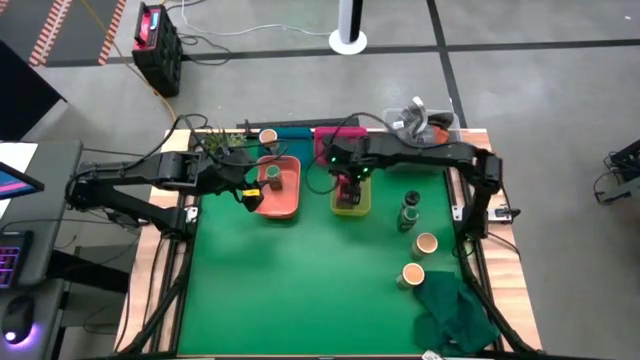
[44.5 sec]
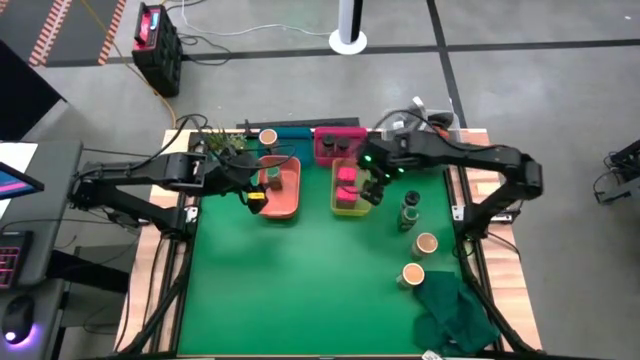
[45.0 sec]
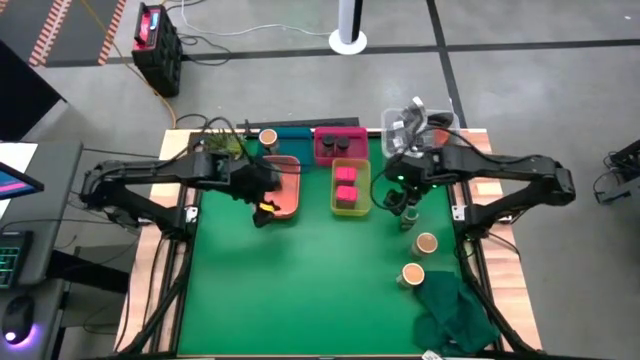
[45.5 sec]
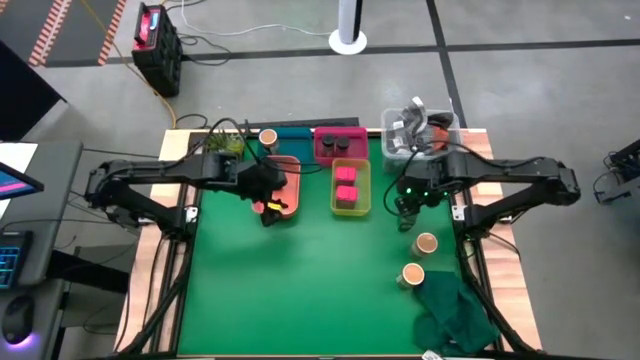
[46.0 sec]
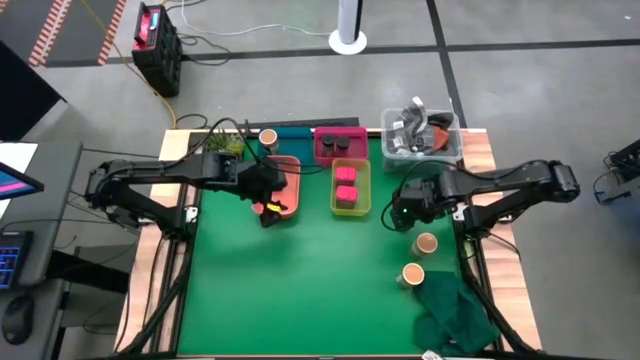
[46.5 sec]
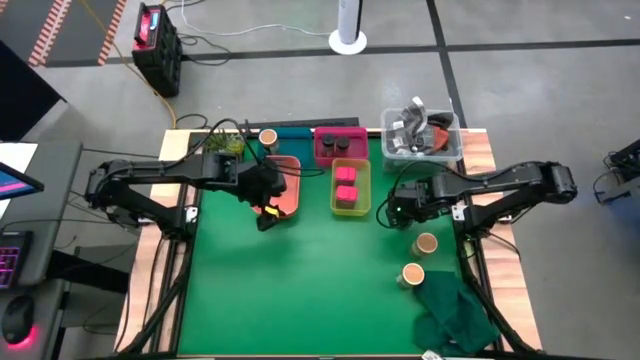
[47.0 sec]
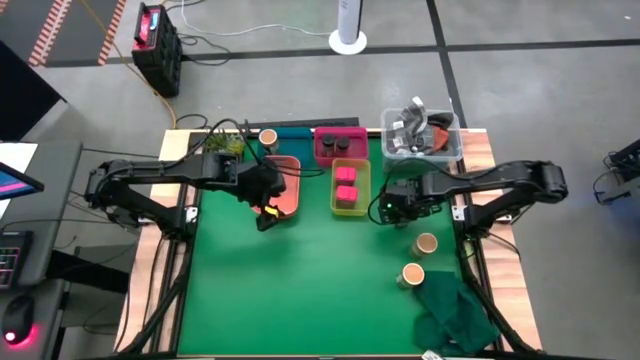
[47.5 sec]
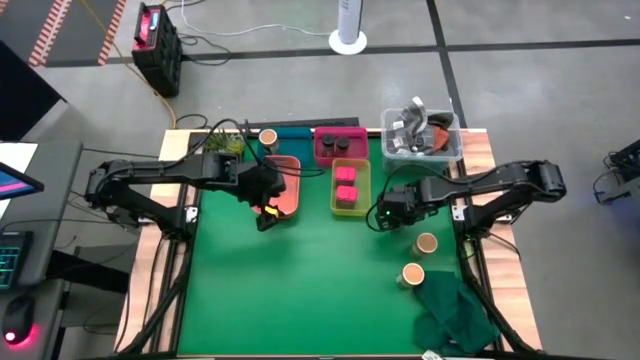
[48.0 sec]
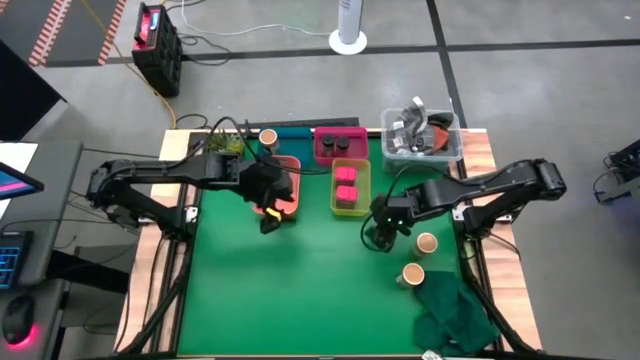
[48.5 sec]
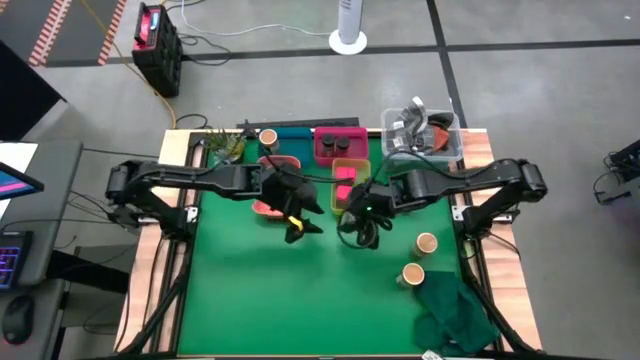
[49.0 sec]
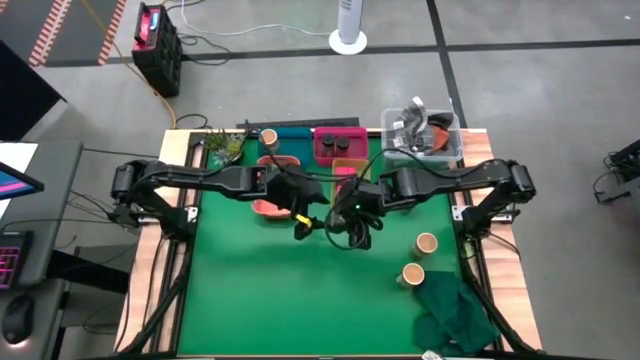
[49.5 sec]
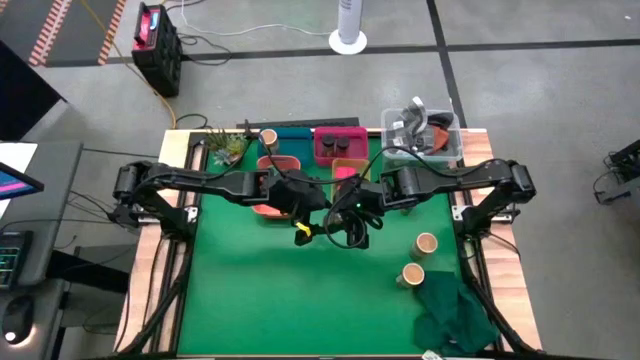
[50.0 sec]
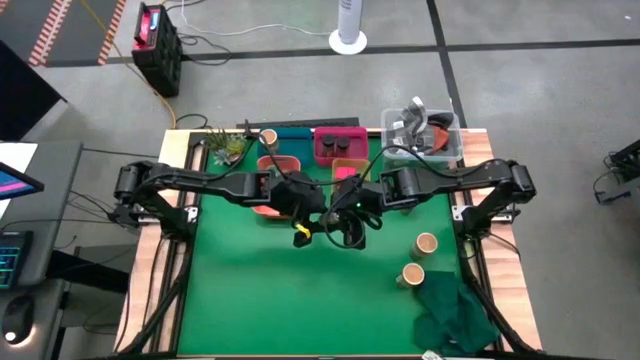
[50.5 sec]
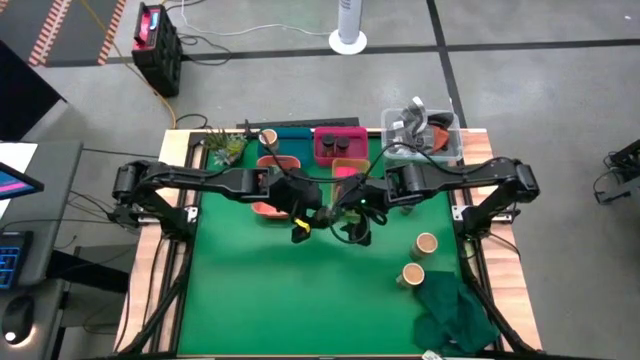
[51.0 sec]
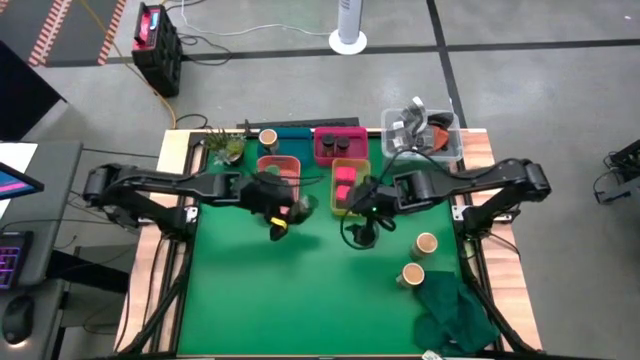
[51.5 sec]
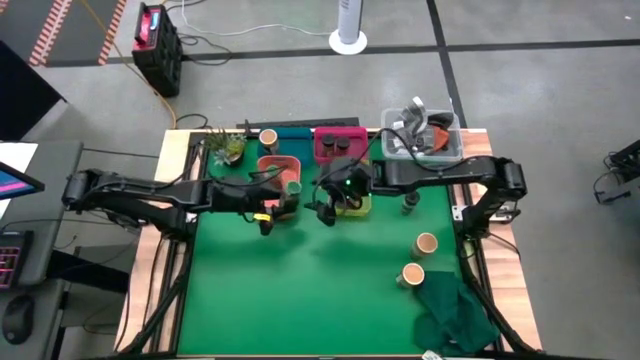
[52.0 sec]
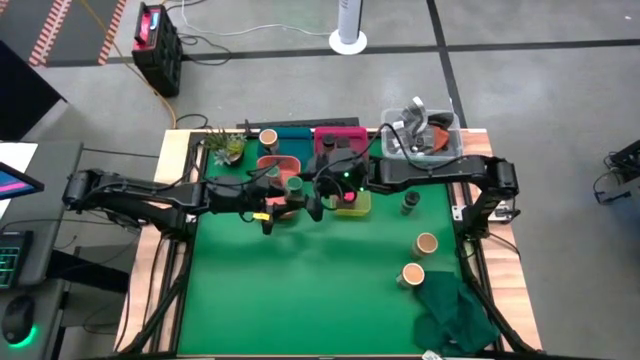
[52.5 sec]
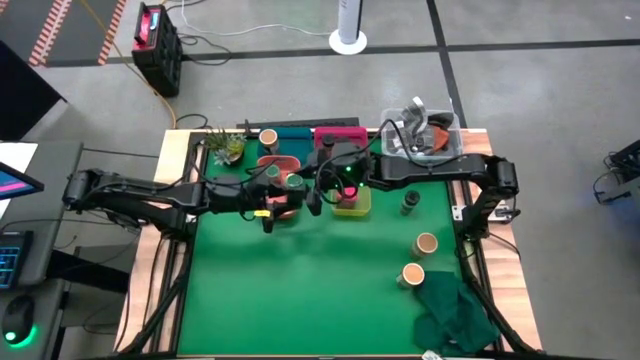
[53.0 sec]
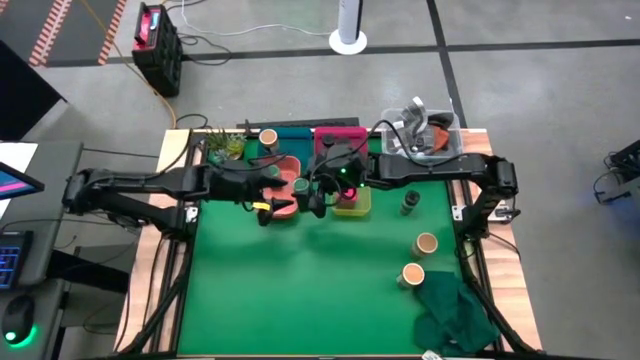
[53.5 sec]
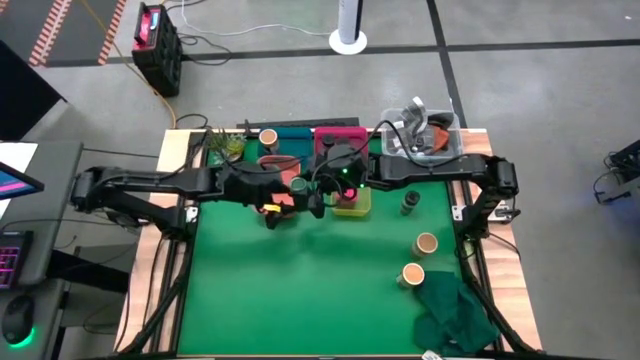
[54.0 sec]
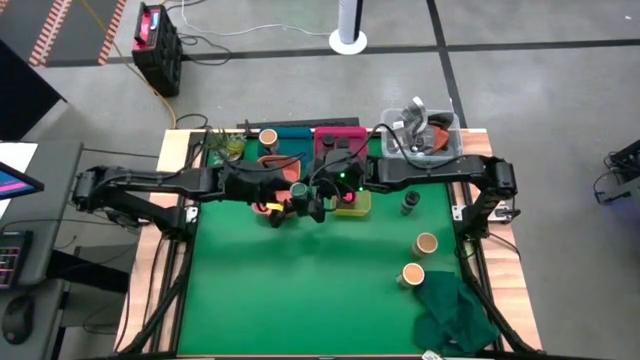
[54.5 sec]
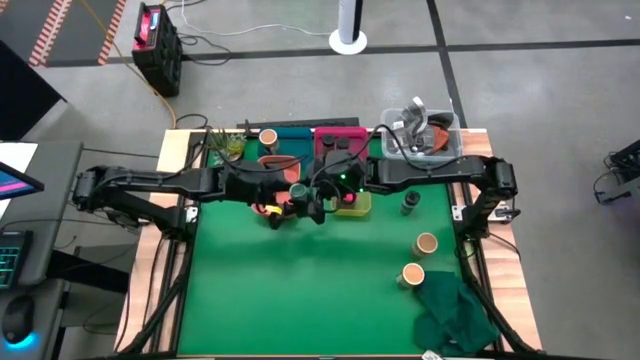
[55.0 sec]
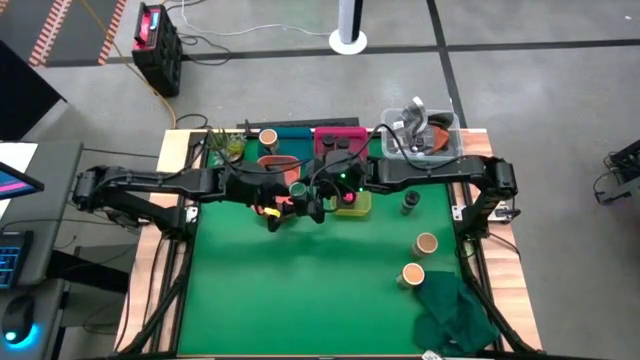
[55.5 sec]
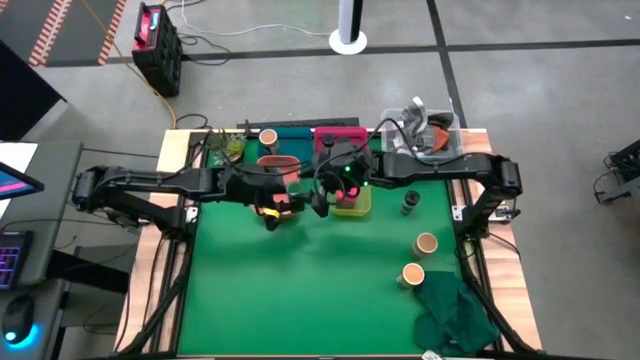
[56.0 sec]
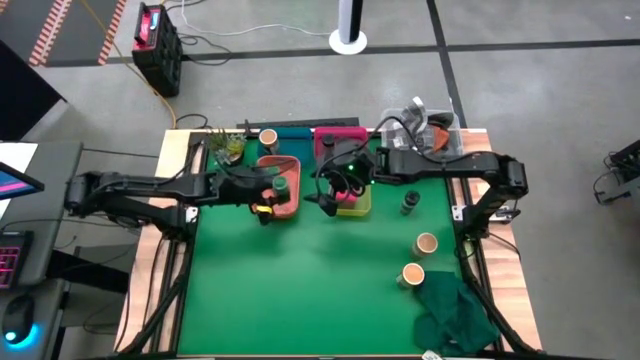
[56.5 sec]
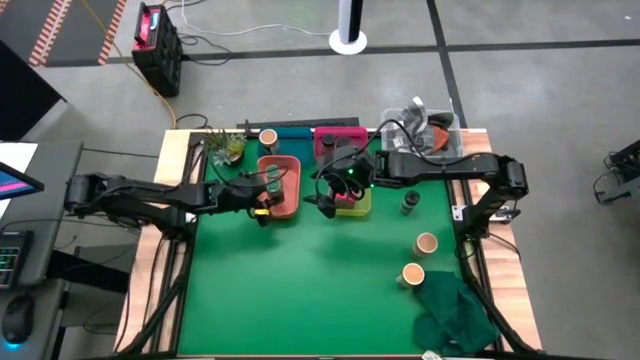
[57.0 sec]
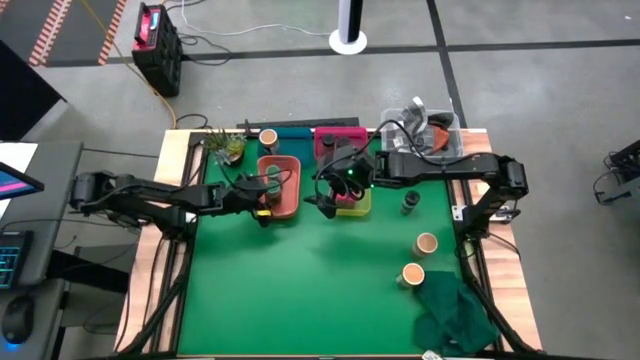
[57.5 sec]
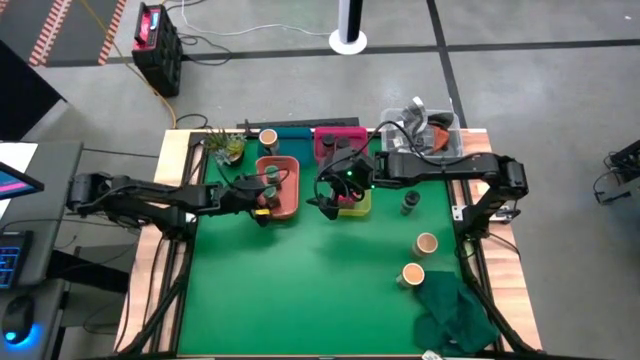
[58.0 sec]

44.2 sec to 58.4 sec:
Task: Sort spices by type
Put the green seasoning bottle into the orange bin

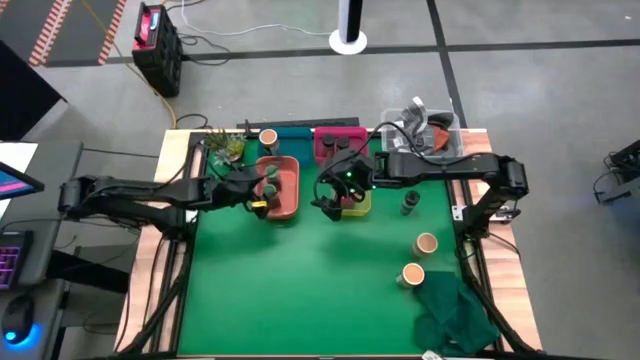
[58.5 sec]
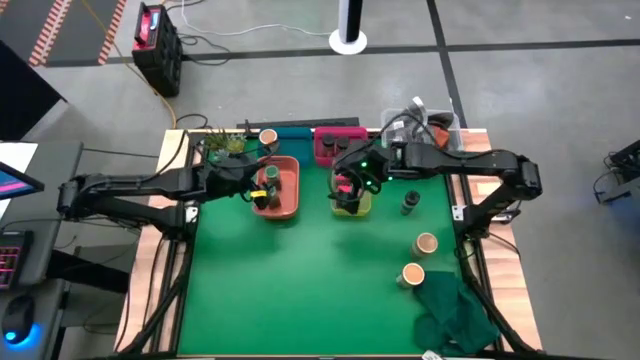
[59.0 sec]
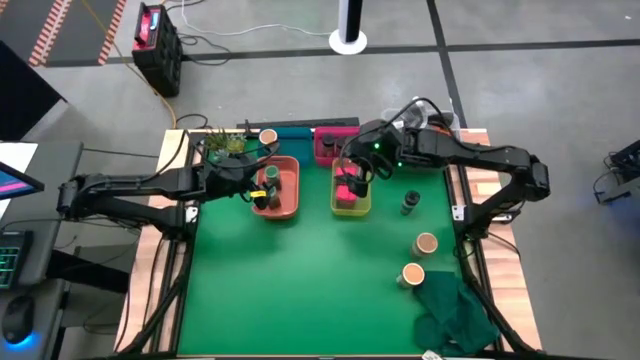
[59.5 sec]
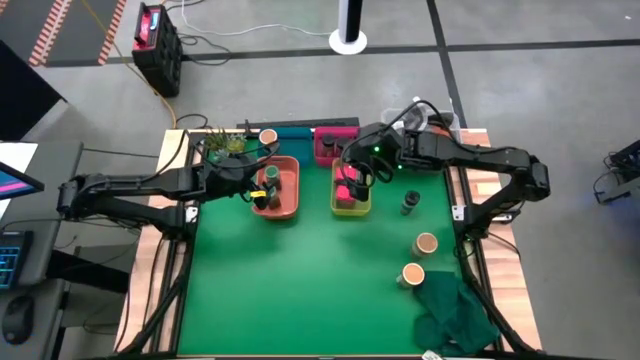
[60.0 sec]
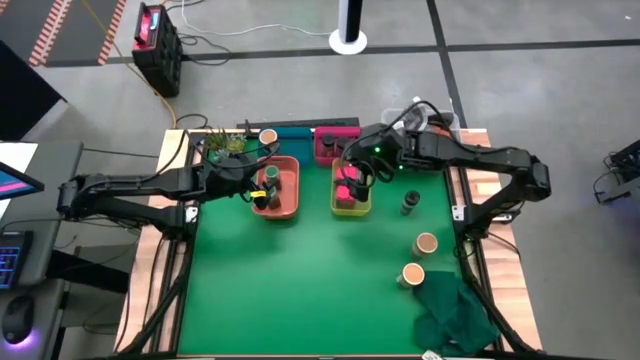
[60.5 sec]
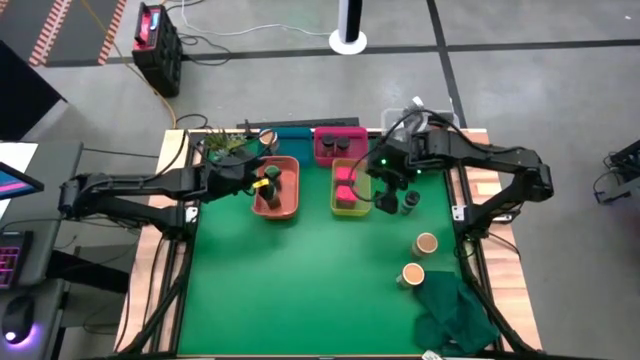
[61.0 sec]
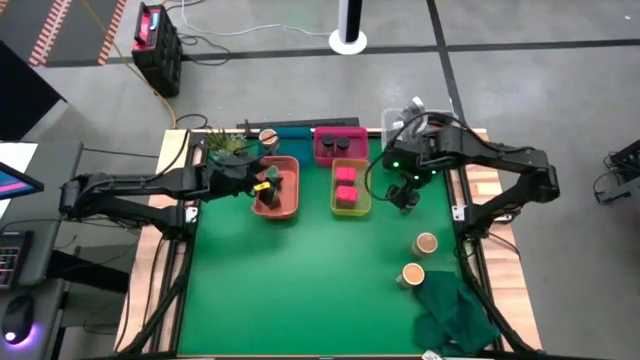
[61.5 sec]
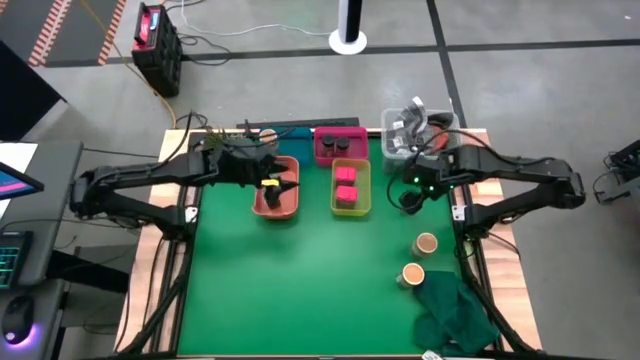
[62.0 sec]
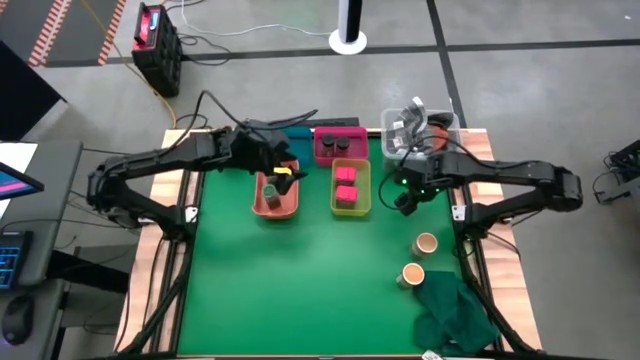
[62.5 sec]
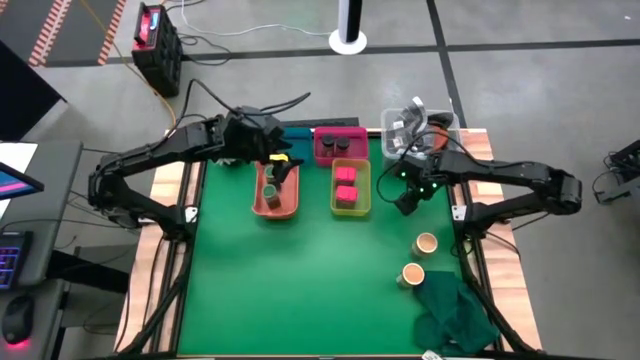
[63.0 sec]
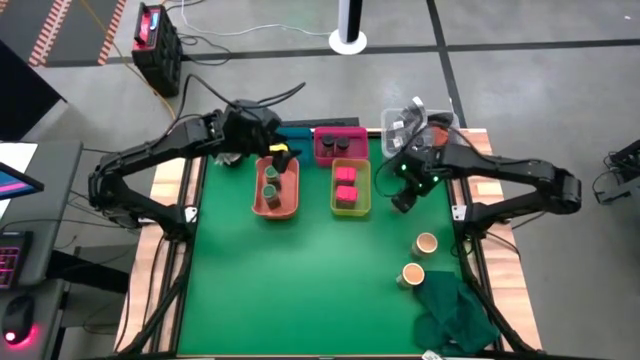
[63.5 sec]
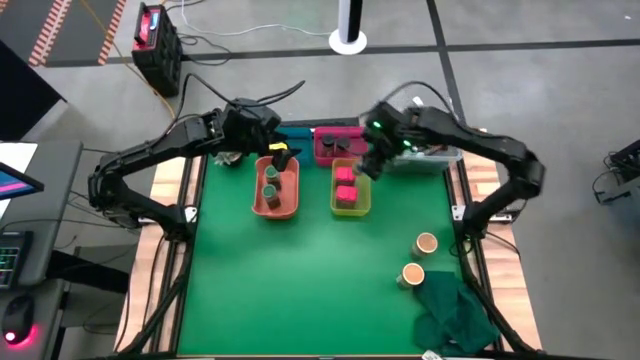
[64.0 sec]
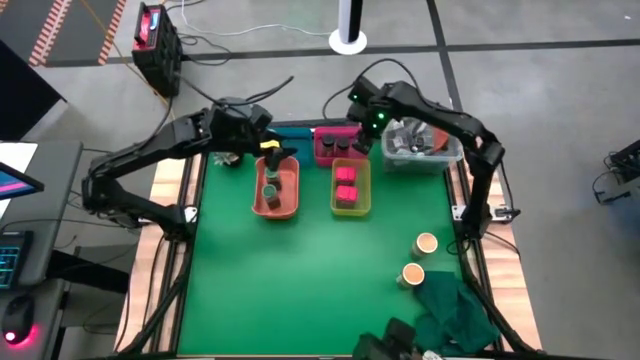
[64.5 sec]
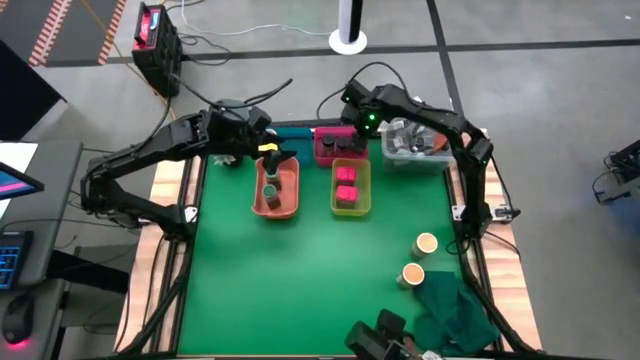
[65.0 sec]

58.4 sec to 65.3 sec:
Put the black seasoning bottle into the red bin
